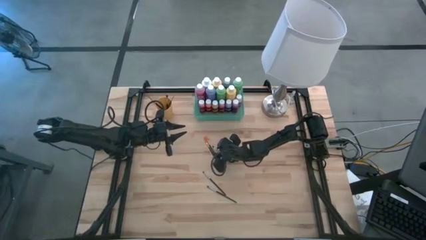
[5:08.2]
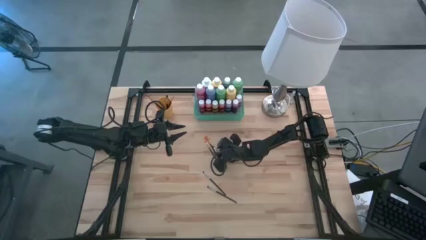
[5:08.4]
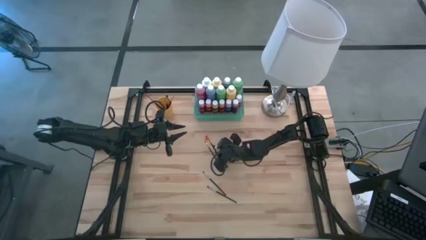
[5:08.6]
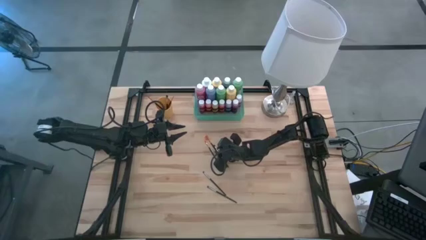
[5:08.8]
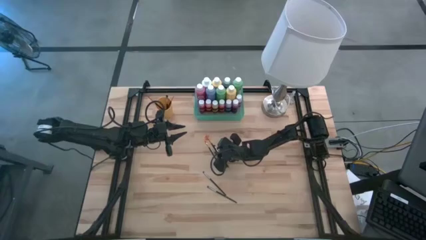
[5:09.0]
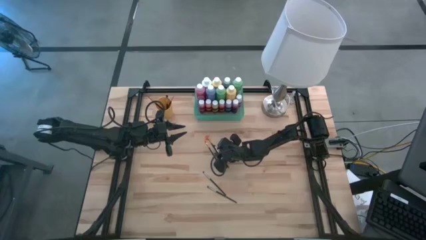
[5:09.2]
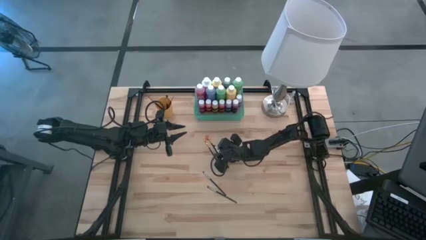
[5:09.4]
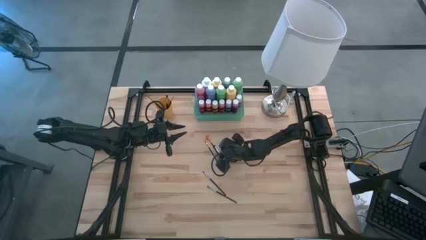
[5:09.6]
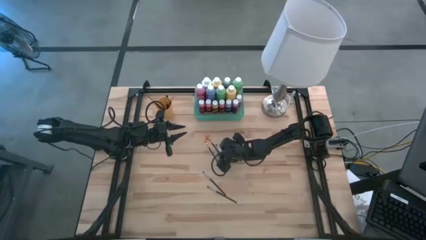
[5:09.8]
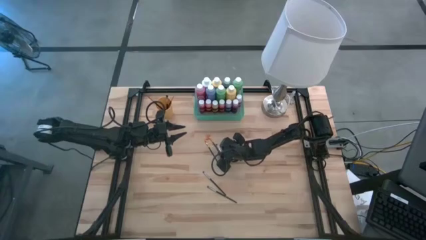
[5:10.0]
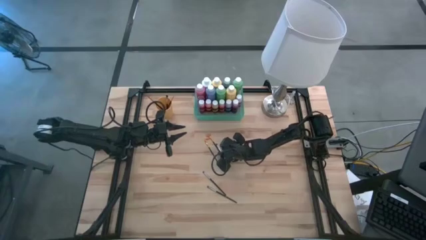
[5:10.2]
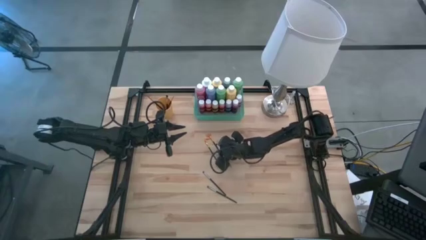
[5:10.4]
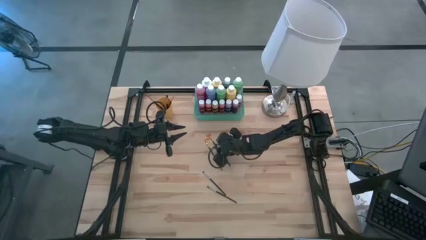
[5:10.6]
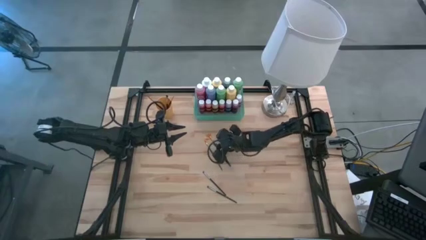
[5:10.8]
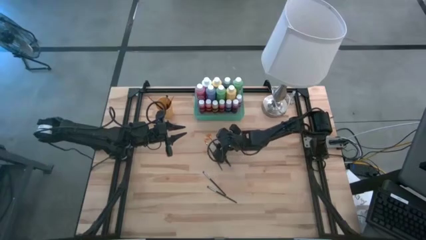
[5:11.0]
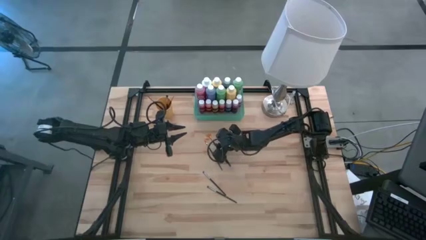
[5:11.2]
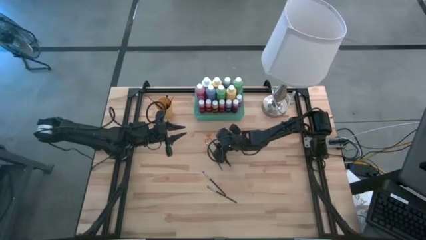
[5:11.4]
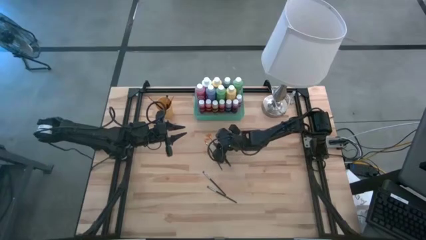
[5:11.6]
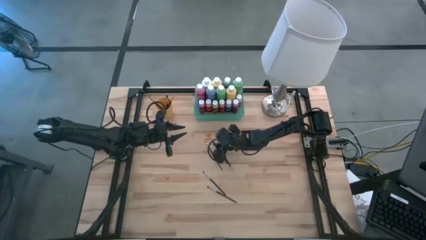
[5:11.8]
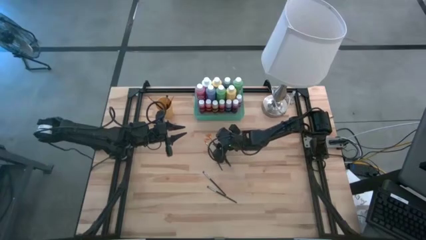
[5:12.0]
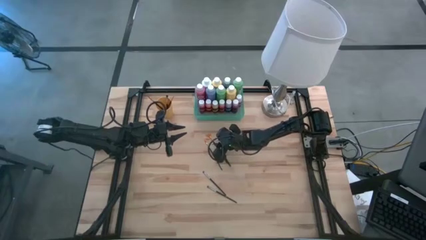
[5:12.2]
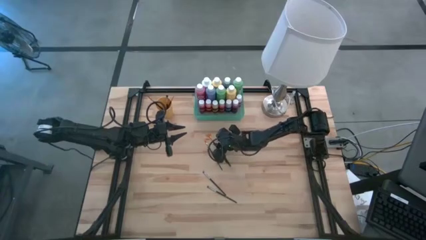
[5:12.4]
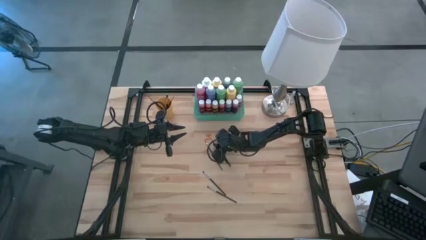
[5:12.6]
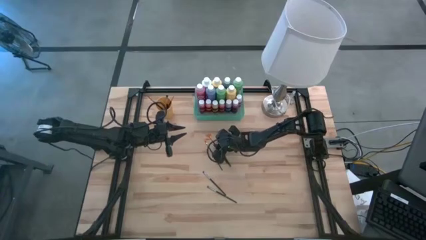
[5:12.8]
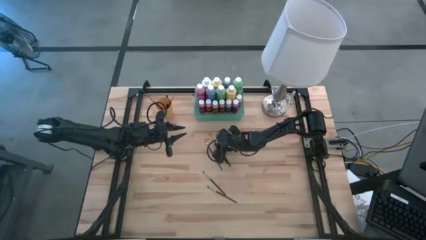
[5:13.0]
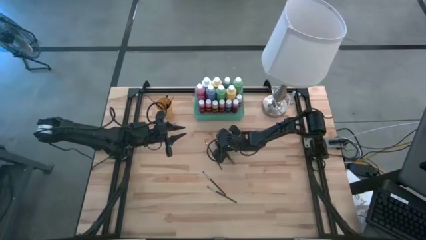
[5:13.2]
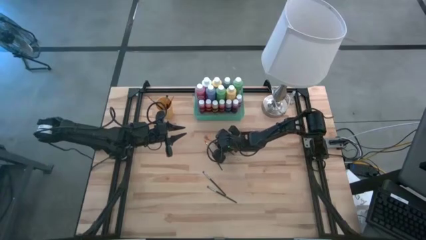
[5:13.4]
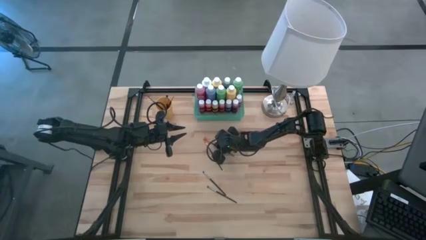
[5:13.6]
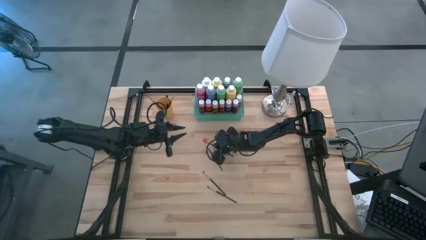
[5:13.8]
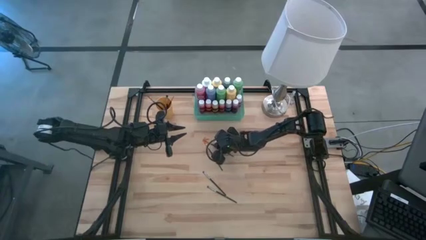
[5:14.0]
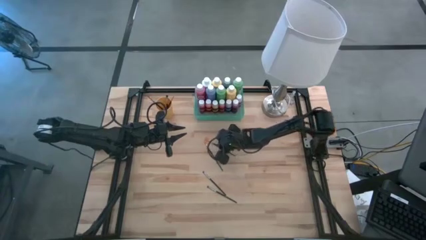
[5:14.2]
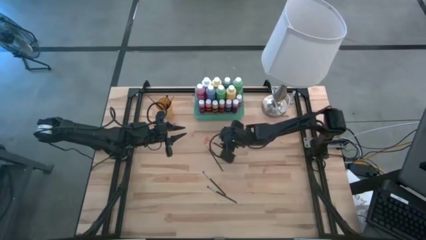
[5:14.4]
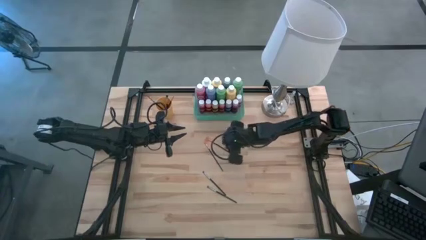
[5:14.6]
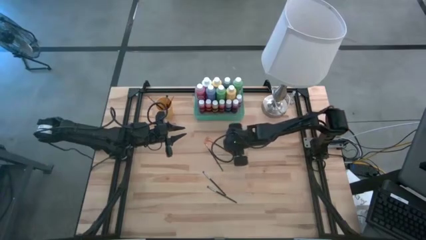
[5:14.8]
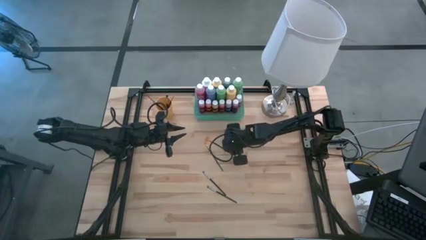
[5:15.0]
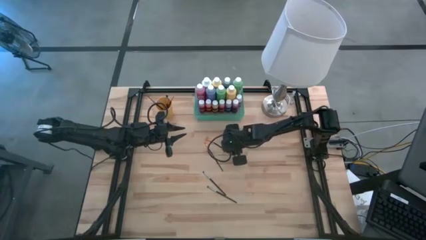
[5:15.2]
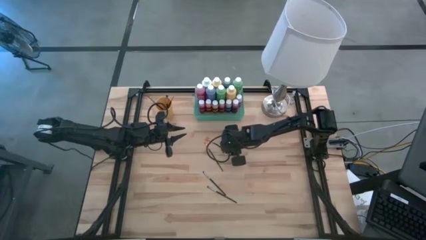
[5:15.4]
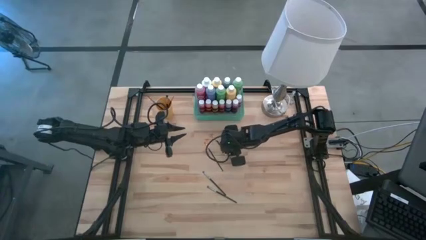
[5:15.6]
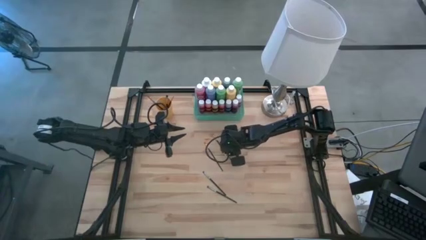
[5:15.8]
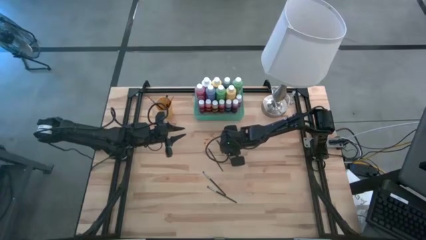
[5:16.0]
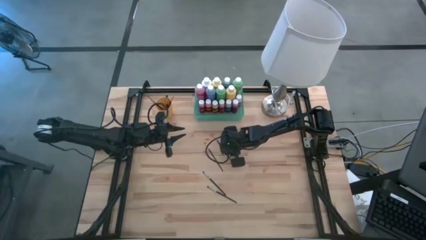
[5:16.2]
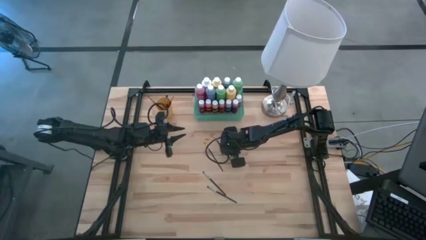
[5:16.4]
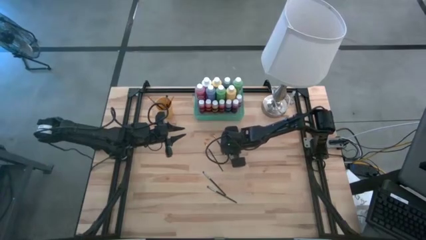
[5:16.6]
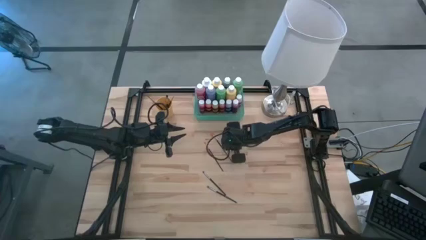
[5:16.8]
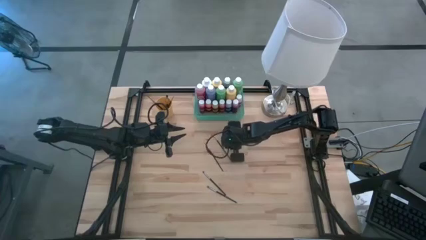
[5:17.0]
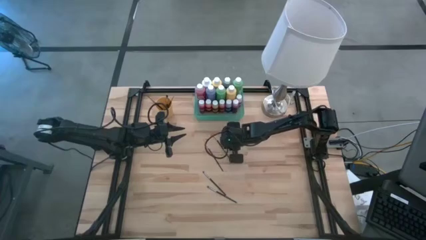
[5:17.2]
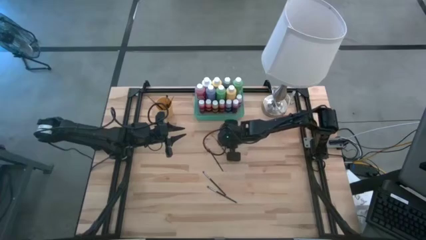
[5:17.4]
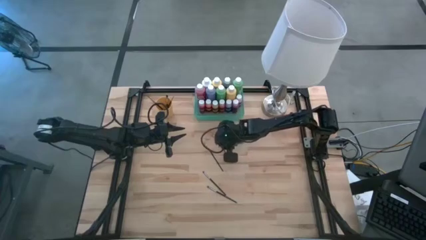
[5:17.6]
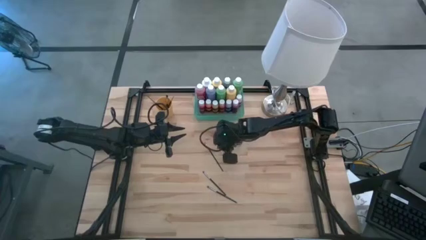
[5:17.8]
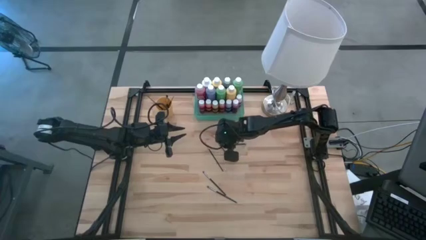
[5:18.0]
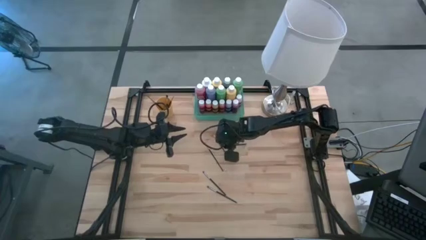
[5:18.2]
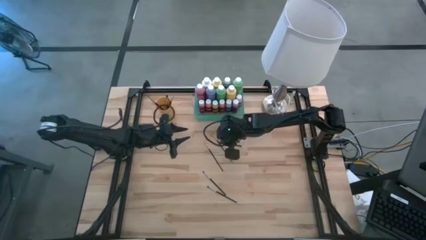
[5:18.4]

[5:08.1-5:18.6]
Task: Pick & Place Paint Supplies
Put the silver paintbrush into the orange cup

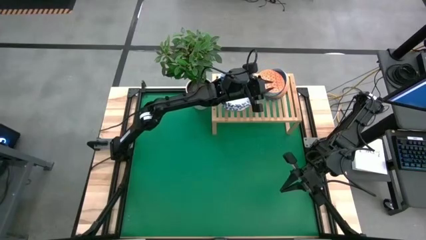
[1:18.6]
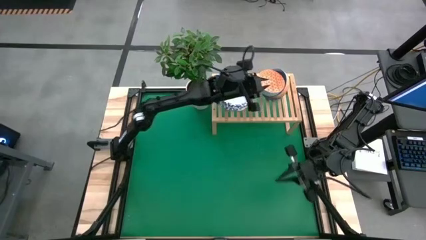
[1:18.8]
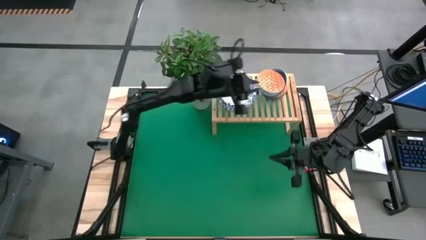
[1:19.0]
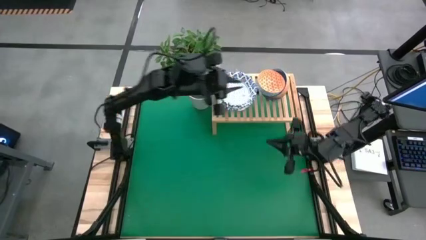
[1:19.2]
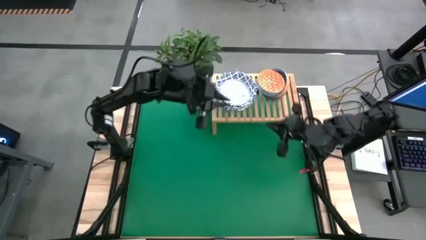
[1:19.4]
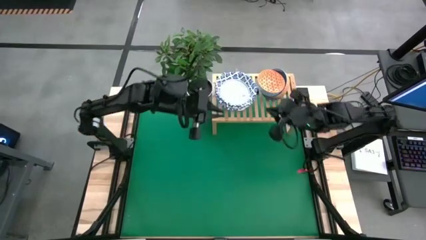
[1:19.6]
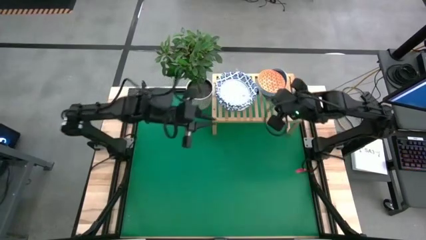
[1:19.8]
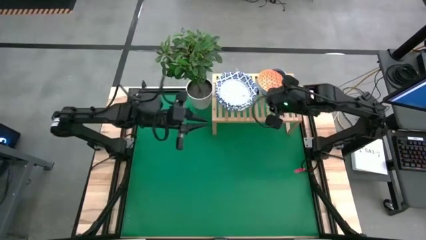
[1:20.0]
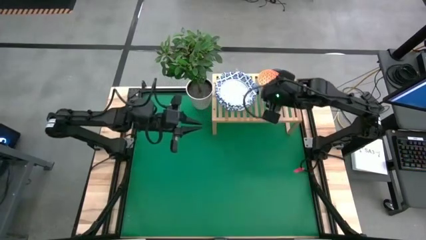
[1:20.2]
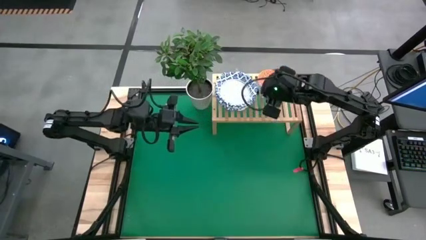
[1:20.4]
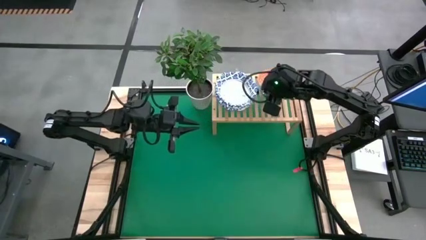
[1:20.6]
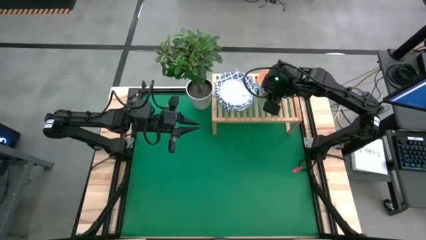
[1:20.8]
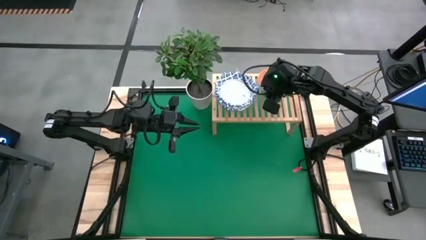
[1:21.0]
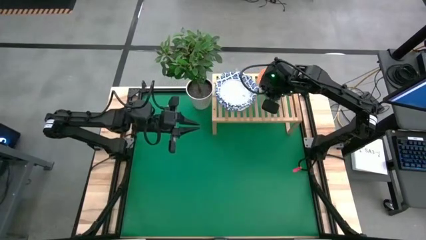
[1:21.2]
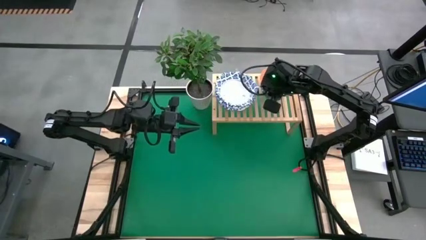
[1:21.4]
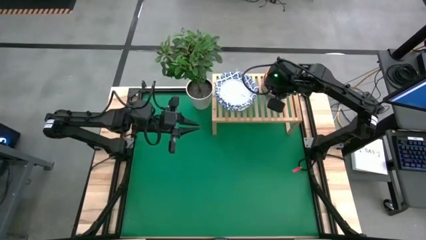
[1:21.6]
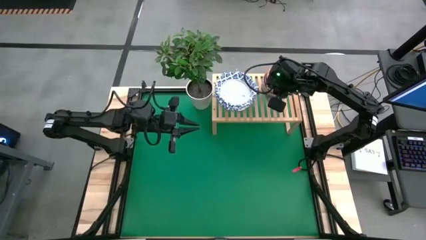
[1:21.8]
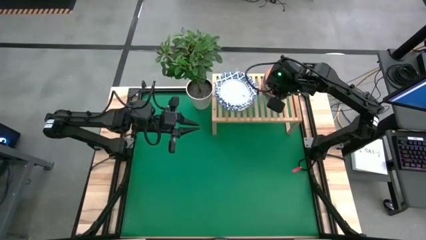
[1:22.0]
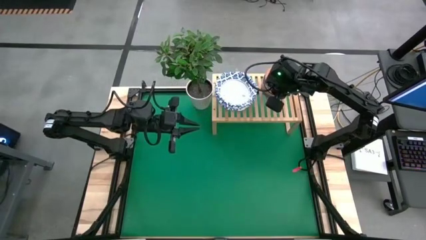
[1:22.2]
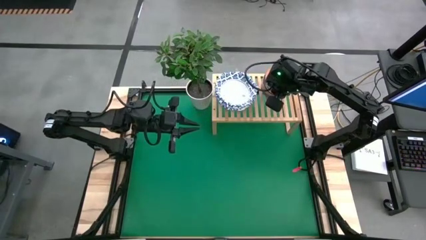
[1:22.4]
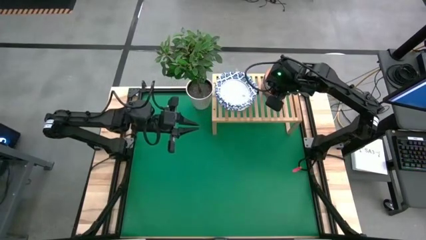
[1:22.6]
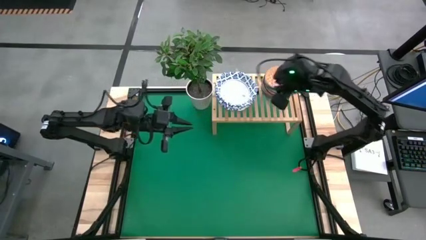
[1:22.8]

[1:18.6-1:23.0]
Task: Place and stack bowls onto a shelf
Adjust the orange bowl
